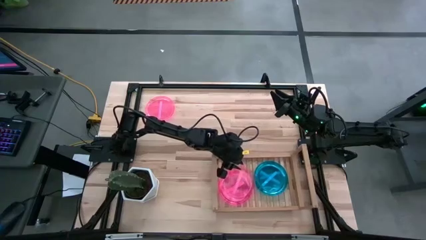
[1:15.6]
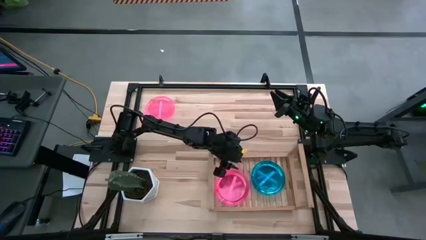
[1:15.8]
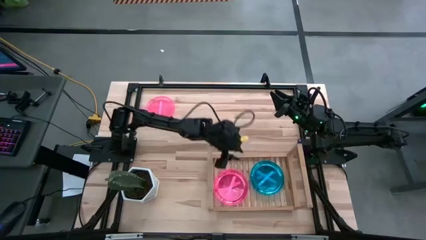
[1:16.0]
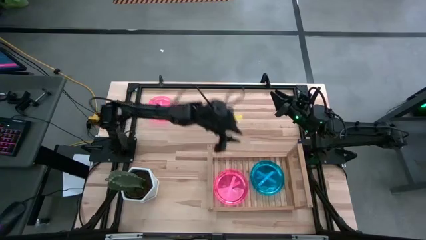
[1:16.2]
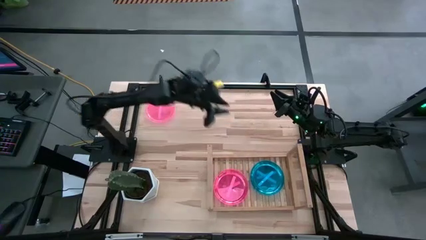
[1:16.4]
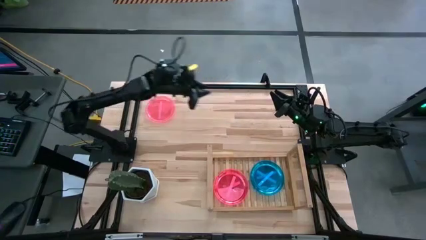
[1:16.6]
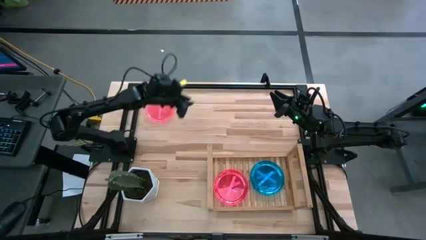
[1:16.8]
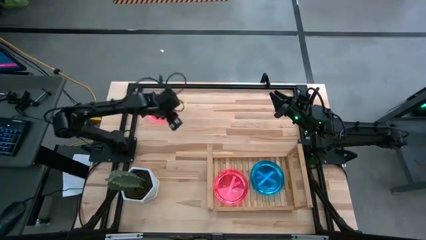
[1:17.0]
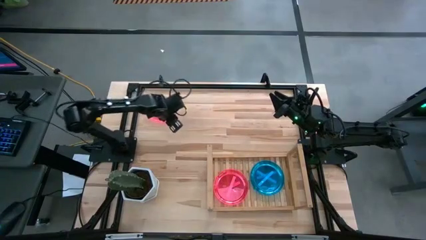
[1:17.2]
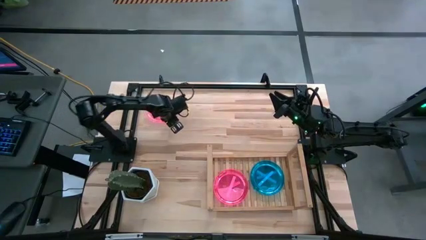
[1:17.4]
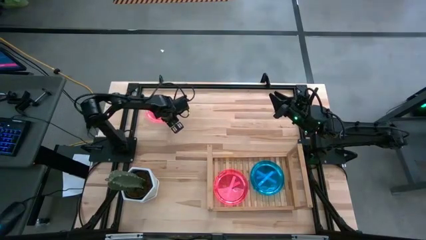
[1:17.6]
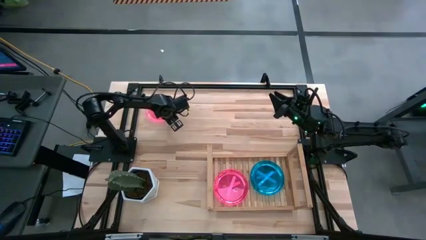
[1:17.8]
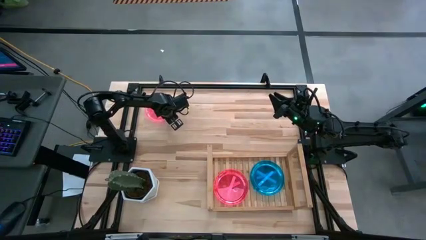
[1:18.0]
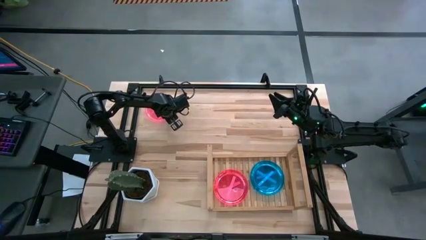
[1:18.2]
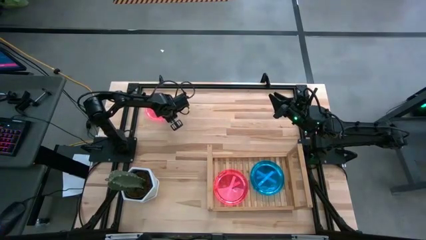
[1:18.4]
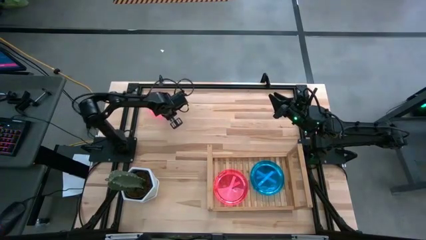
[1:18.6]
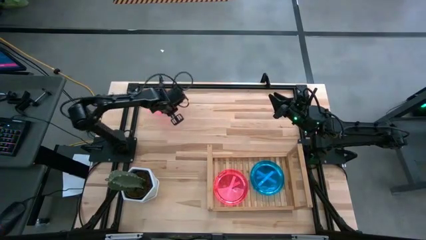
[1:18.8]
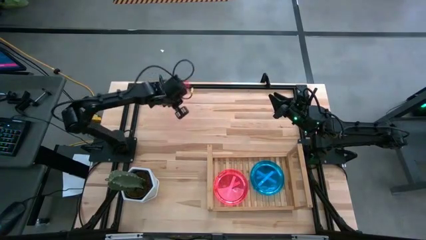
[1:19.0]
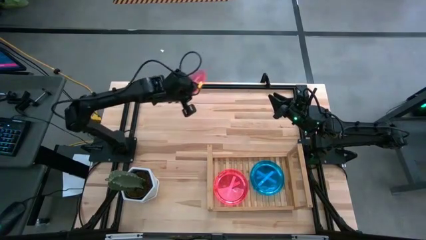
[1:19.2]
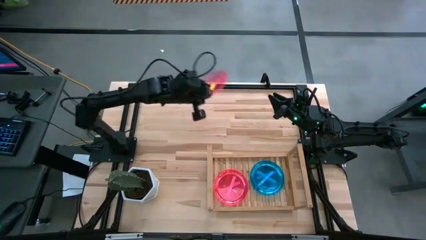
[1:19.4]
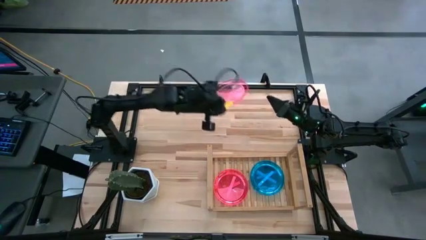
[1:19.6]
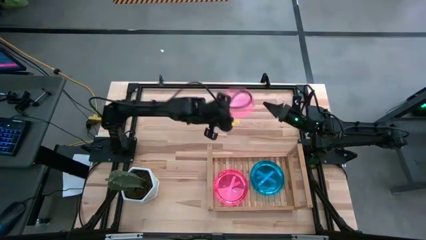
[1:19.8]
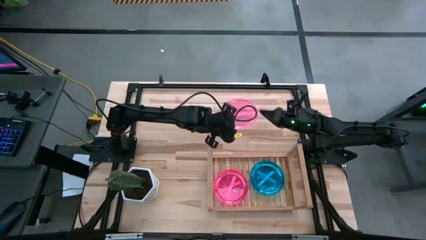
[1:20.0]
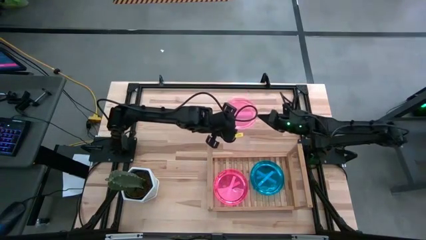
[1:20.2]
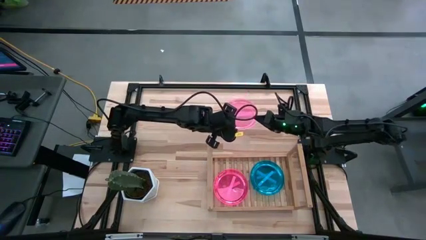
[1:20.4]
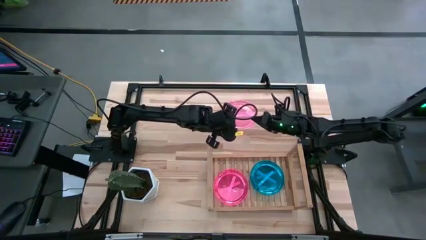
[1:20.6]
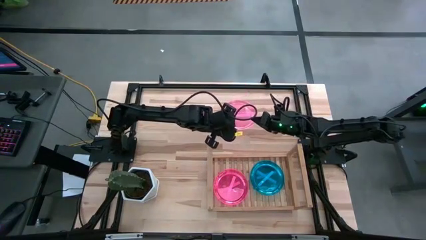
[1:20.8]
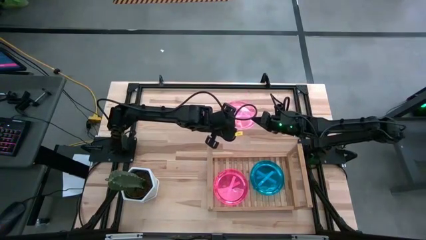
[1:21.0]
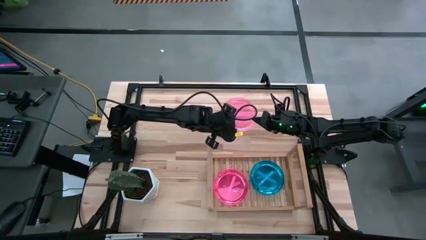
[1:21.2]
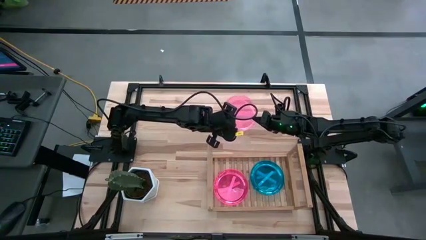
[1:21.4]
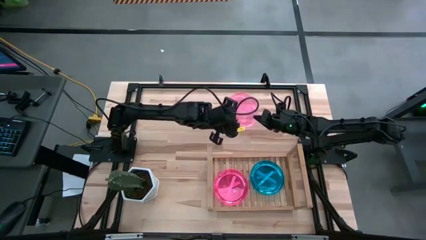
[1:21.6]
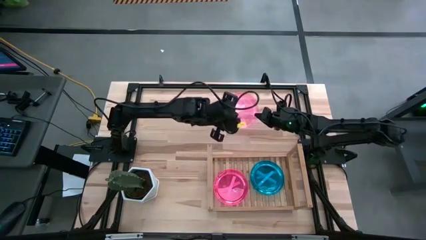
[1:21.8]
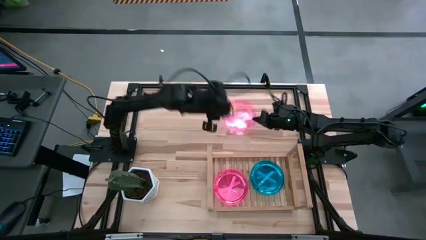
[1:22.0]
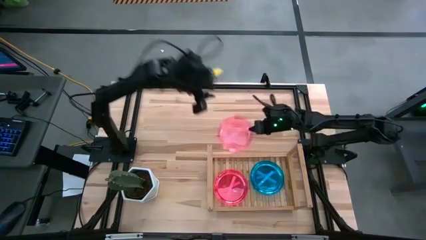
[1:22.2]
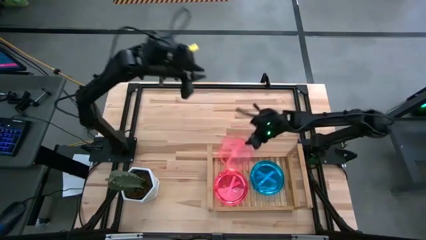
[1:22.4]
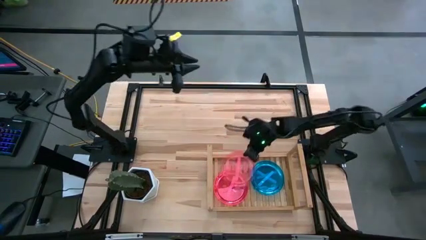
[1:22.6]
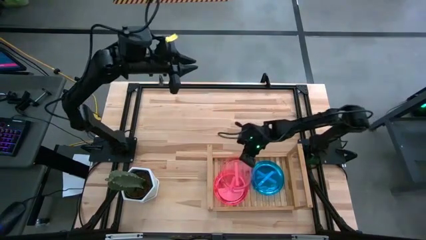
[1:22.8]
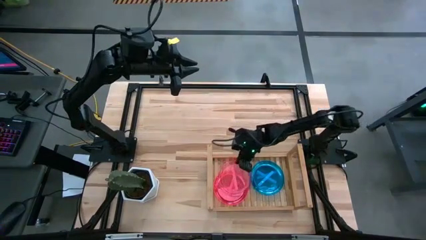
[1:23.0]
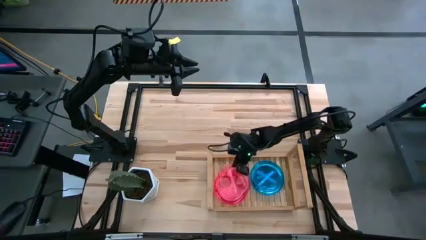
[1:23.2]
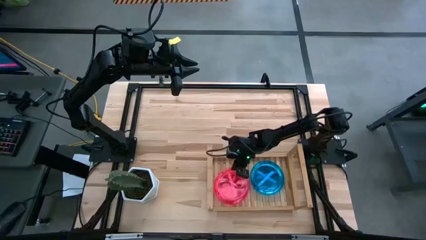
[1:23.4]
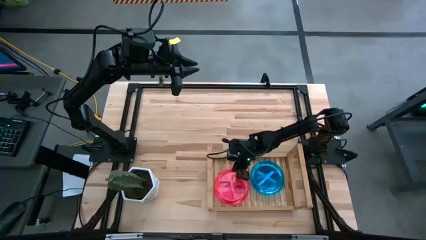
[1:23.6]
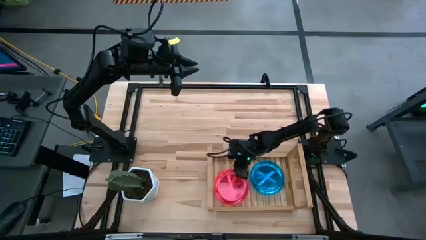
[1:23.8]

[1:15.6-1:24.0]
Task: Place and stack plates onto a shelf
Stack the pink plate on top of the pink plates on the shelf

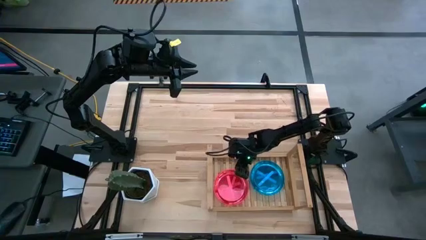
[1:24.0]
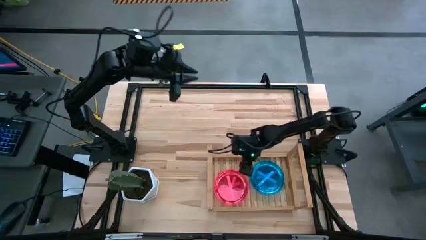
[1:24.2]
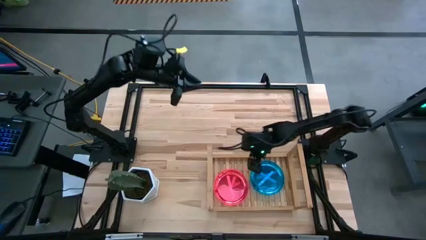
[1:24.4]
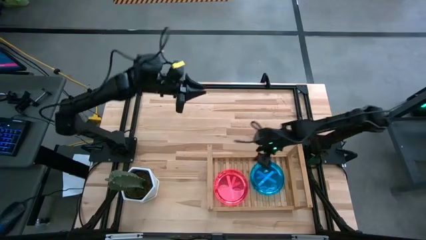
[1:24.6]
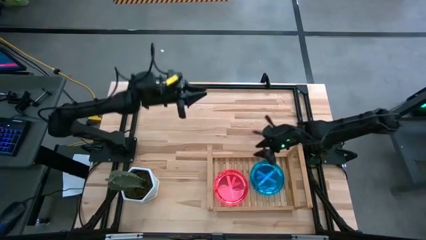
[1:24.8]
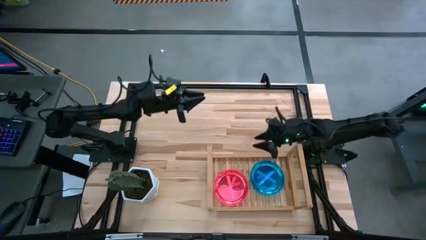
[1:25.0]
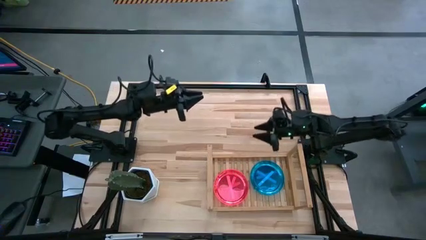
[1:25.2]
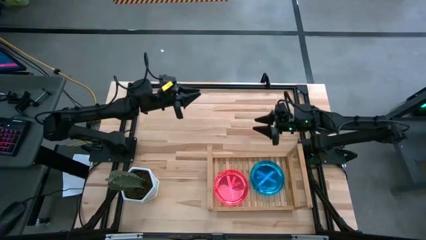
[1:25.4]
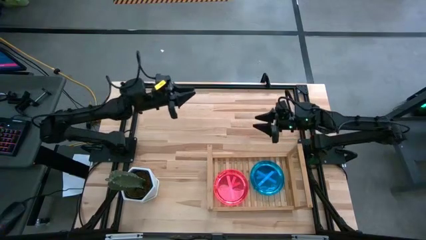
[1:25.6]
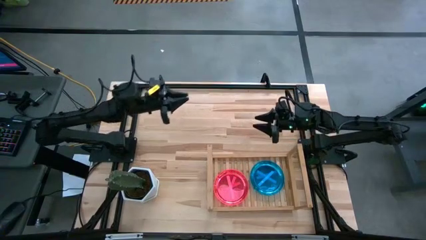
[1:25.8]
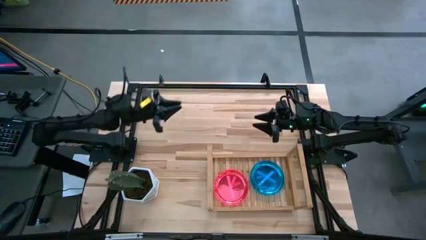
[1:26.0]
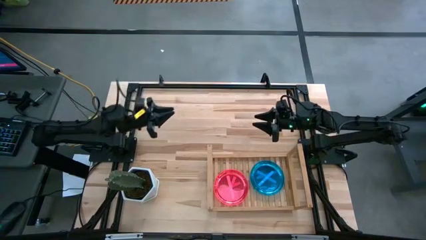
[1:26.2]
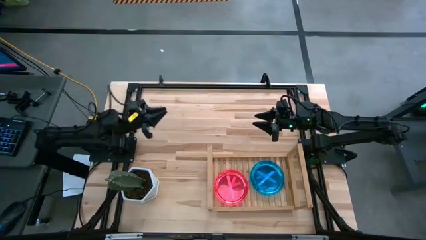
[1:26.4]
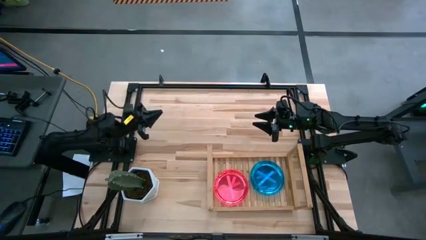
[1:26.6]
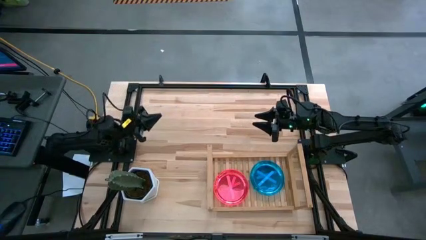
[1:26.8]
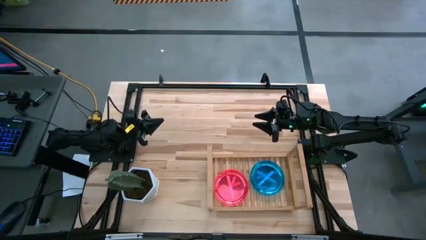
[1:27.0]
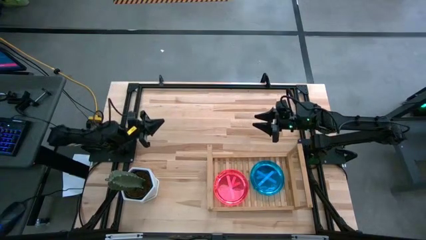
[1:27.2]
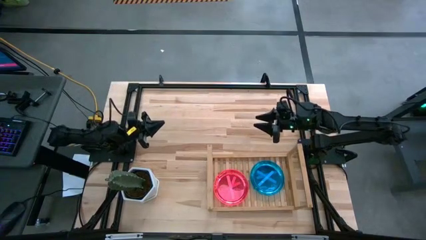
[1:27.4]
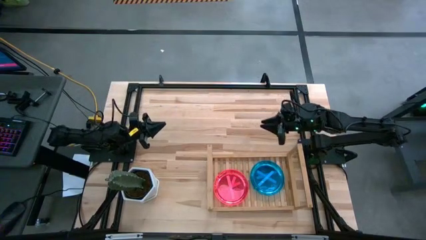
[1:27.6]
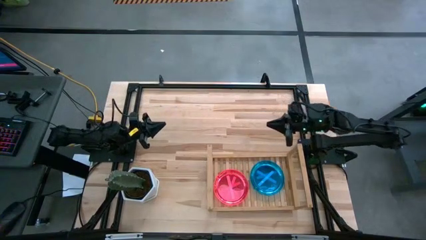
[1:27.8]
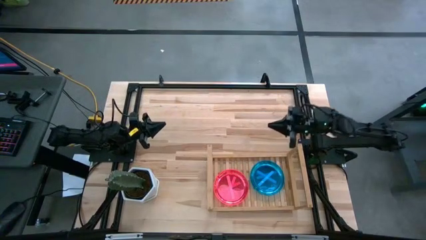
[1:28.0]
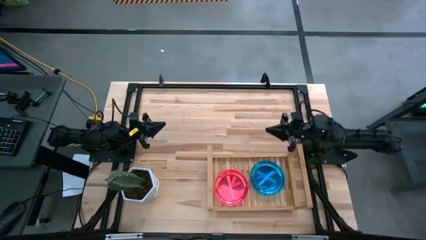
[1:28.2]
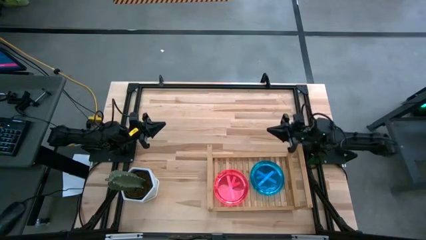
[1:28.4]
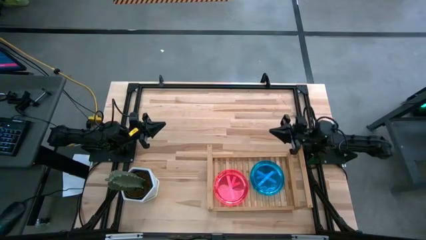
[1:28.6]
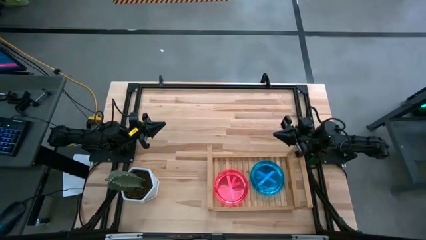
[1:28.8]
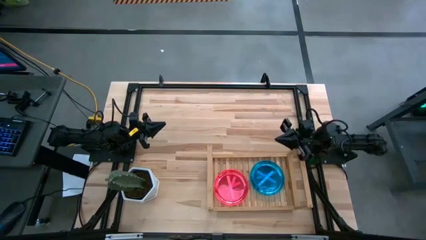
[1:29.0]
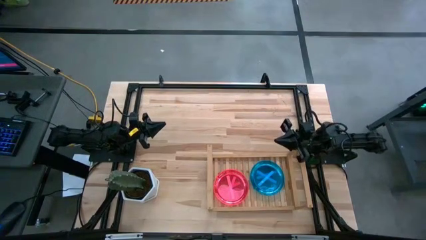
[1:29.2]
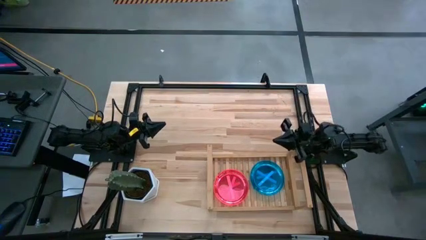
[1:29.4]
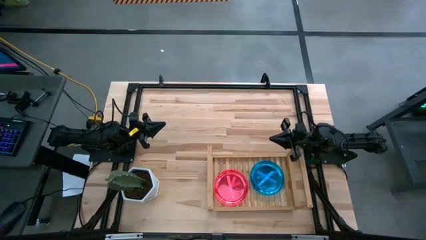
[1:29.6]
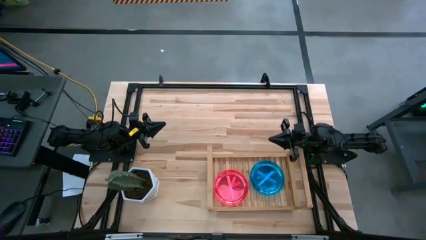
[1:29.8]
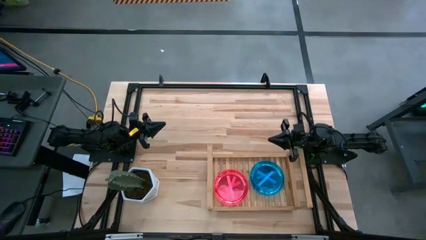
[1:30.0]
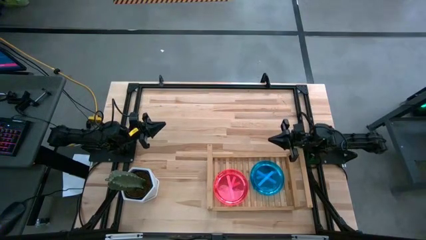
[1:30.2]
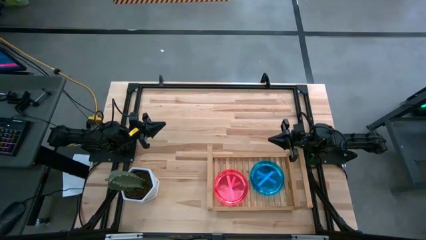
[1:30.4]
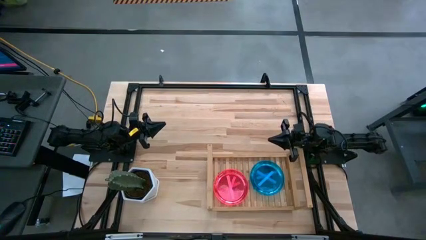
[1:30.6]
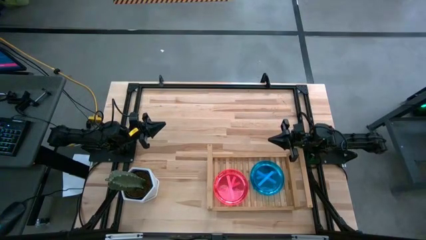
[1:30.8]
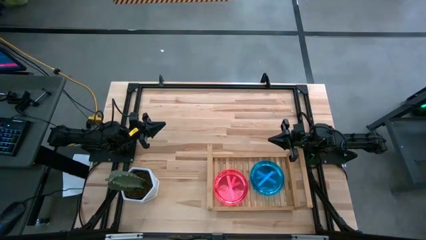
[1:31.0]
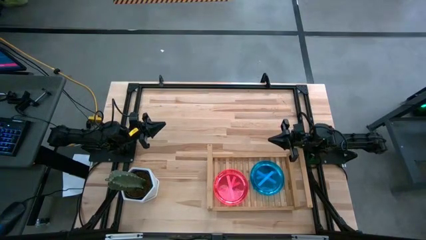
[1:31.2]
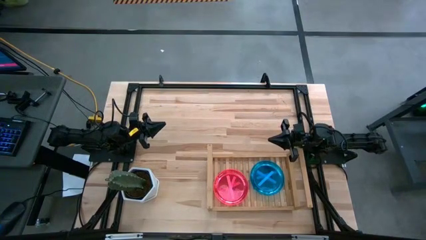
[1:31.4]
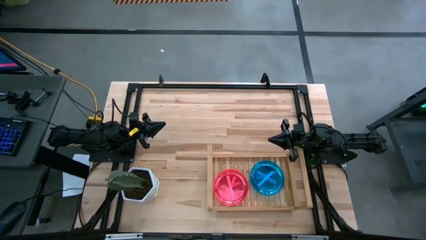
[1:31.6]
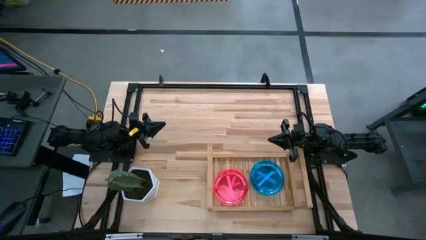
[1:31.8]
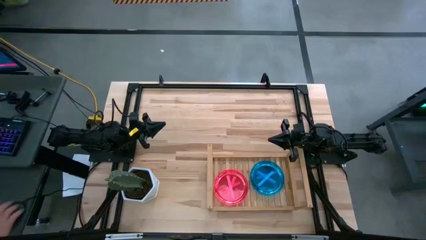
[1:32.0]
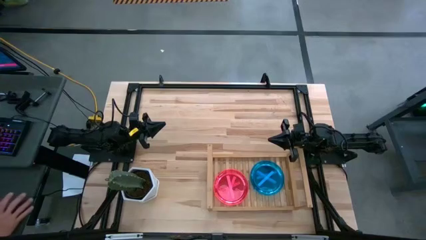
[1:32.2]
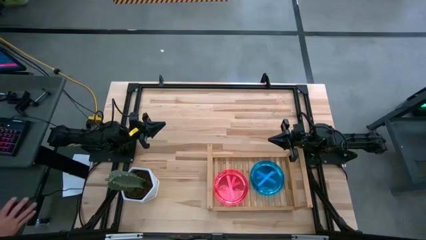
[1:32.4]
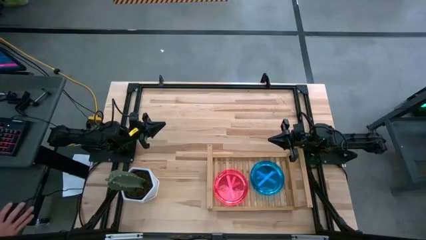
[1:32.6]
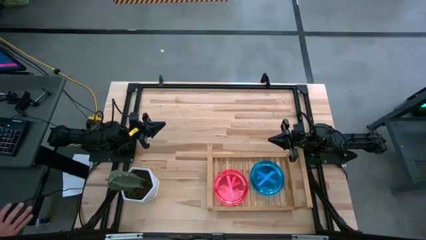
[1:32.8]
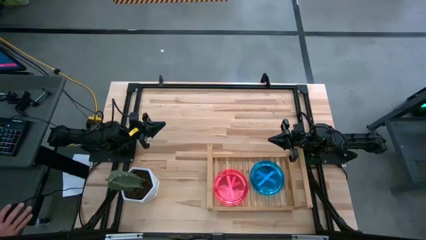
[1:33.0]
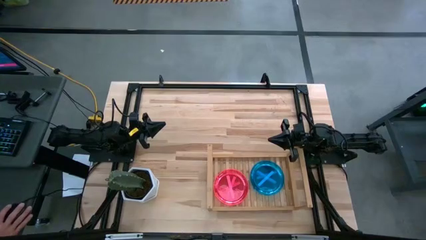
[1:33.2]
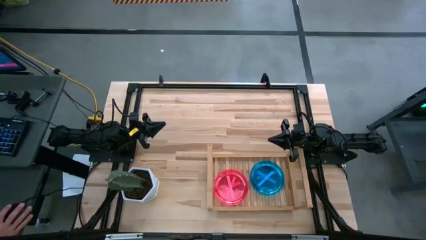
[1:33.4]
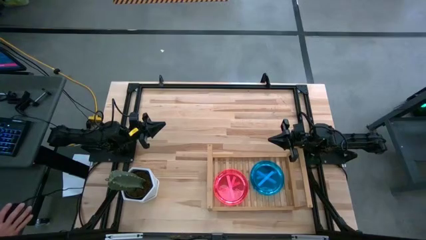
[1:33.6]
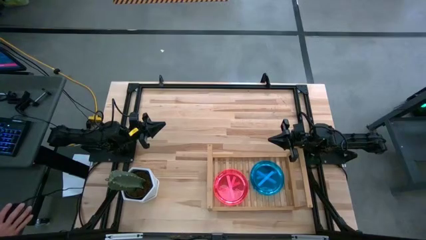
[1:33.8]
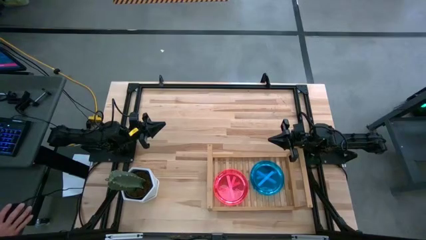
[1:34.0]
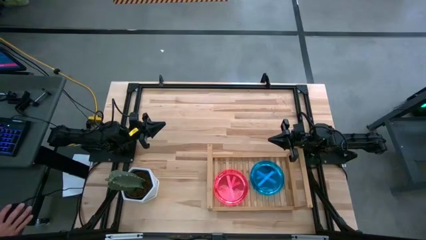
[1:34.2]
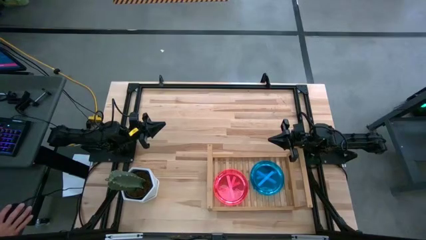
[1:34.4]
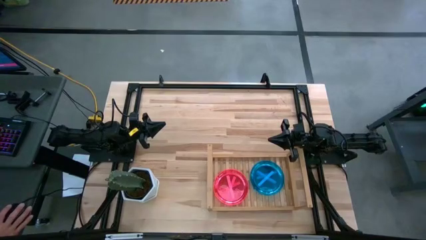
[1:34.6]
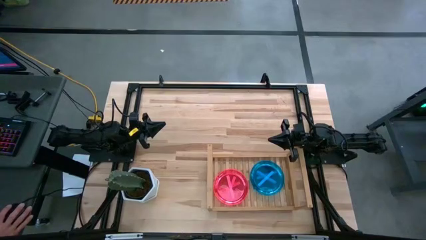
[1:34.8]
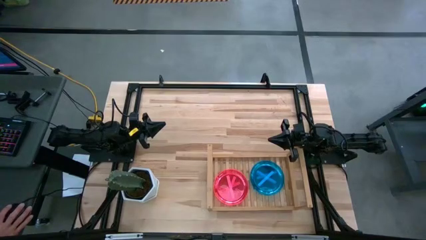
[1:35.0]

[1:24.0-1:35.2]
Return to Home Position
